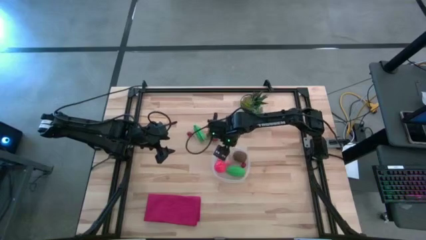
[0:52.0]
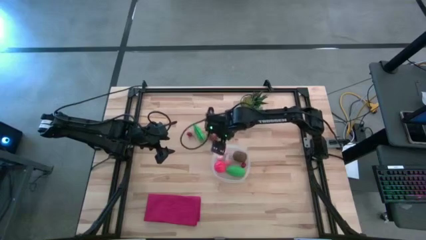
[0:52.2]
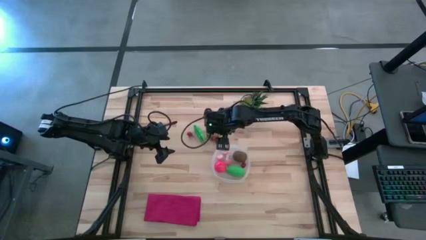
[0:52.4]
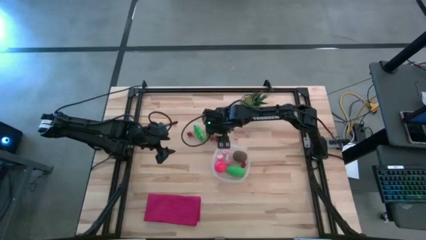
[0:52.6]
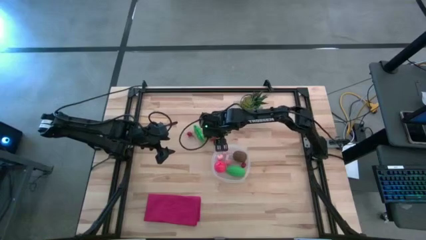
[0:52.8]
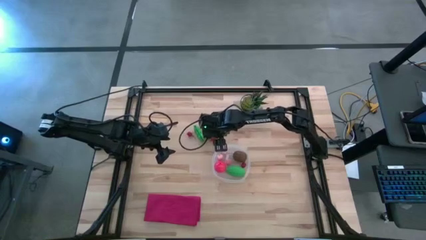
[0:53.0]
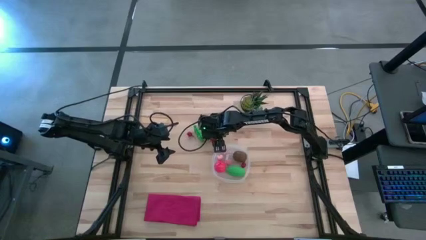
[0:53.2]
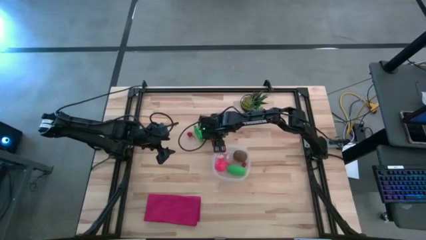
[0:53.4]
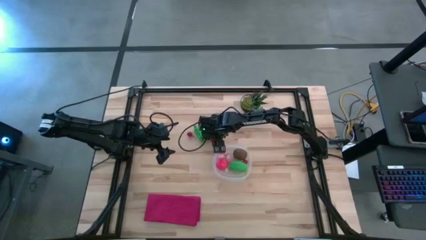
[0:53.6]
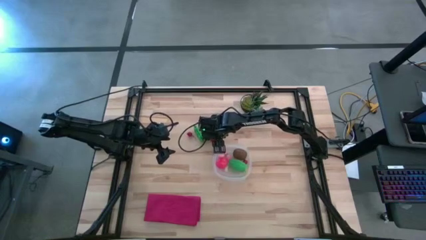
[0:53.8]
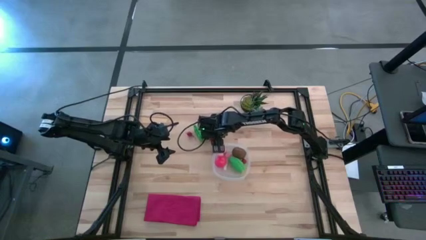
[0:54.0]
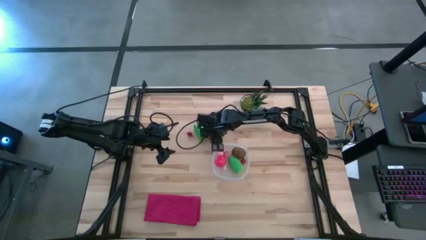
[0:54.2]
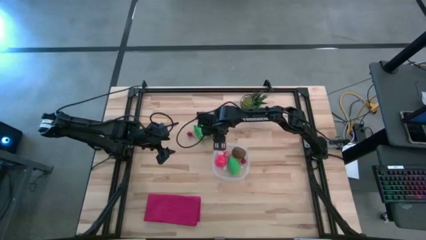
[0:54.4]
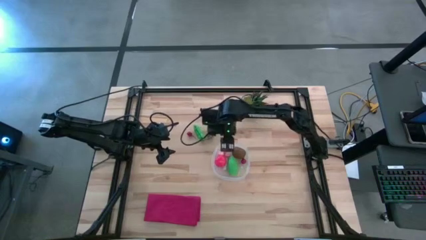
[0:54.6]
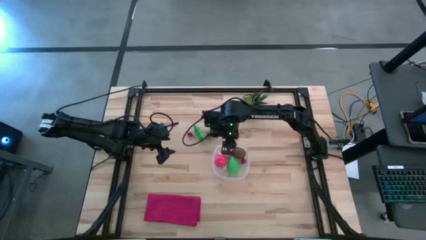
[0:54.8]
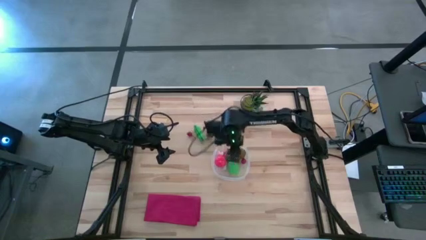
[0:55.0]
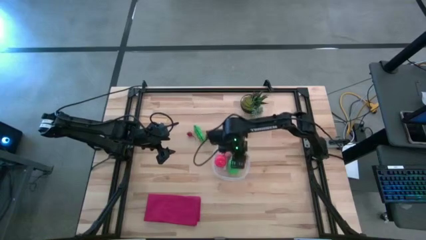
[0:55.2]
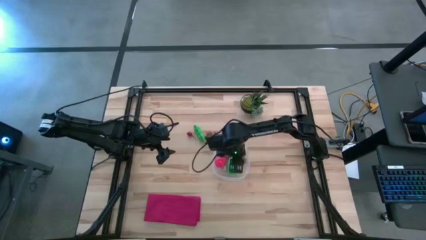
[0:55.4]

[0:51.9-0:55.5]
Task: Pick and placing Produce into tupperware
Put the right strawberry into the transparent container

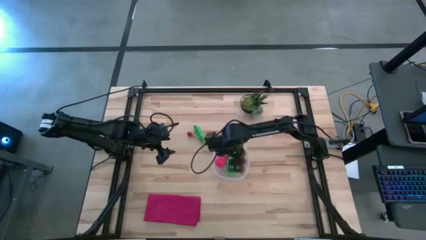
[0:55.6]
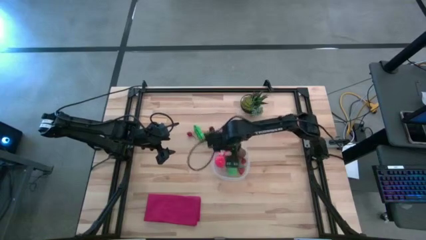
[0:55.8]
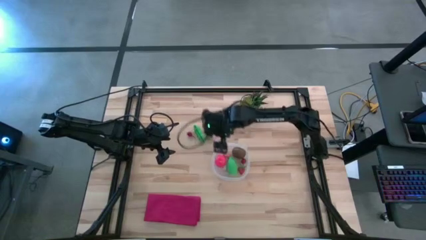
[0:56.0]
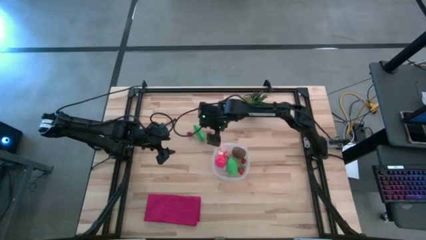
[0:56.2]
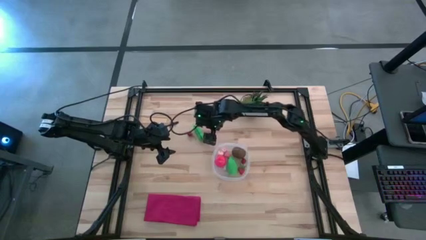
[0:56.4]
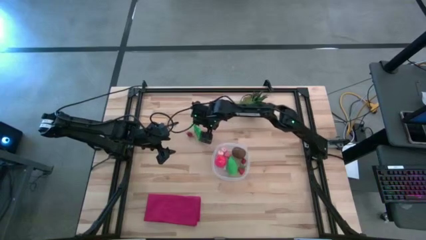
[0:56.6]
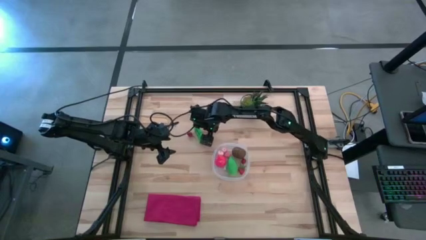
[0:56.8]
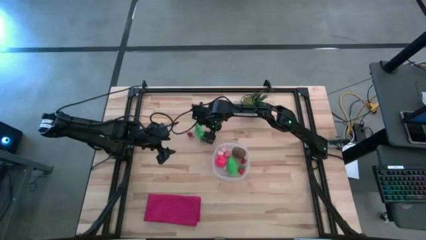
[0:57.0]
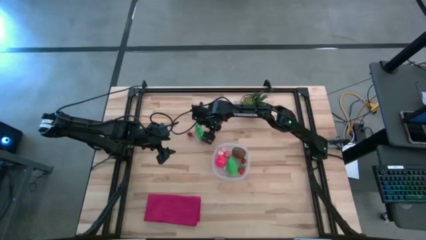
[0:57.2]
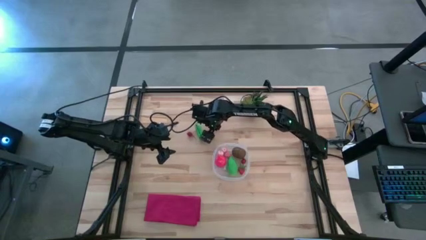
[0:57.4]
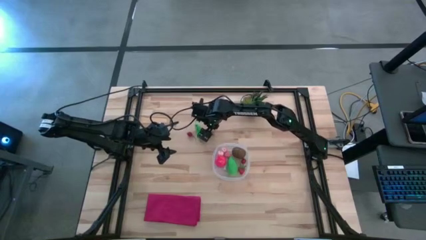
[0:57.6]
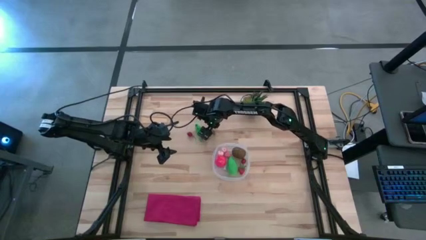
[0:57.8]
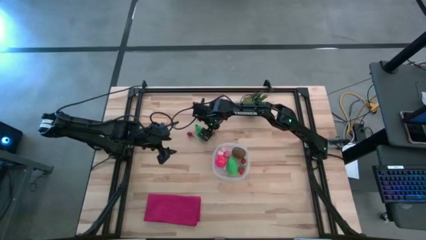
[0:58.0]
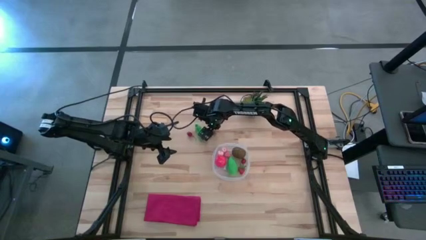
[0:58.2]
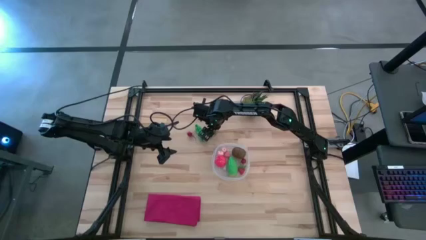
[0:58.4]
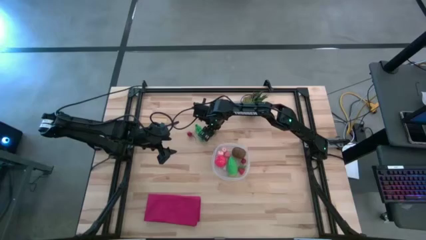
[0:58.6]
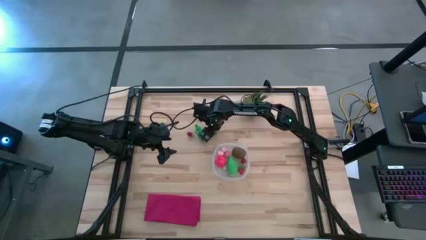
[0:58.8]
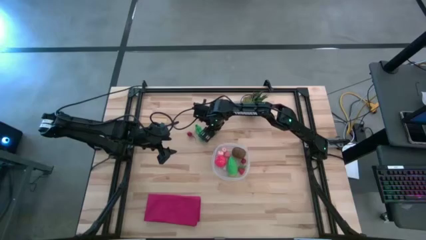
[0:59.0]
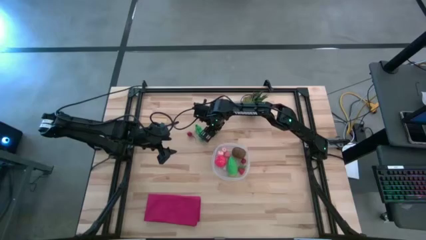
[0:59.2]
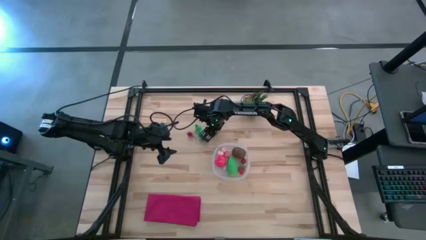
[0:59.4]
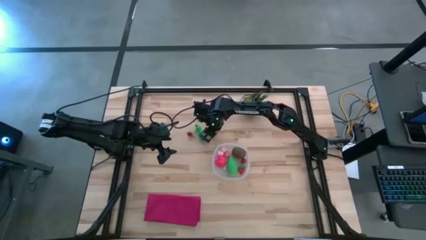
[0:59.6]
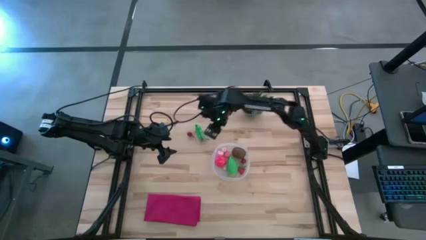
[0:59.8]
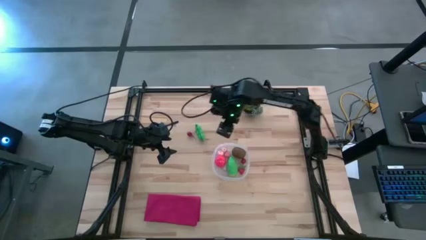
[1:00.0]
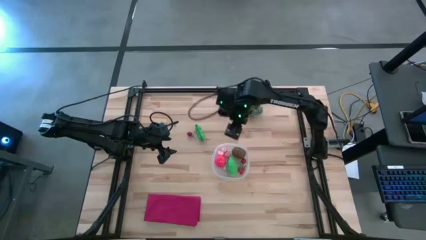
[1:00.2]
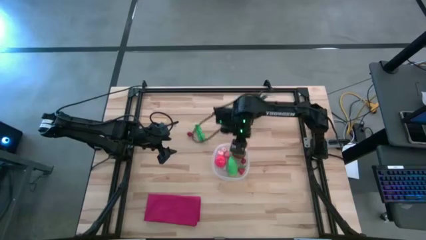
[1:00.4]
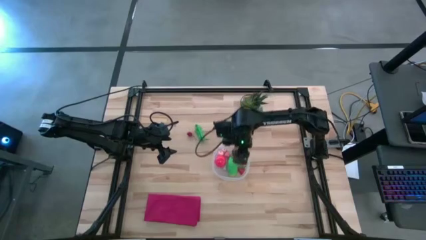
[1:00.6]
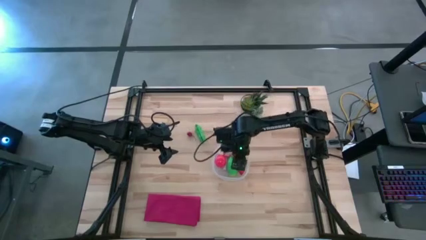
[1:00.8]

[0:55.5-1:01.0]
Put the strawberry into the transparent container

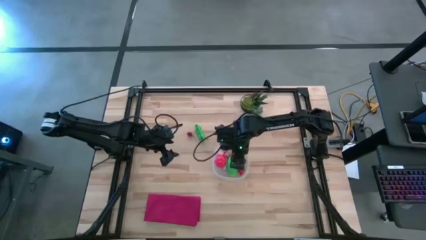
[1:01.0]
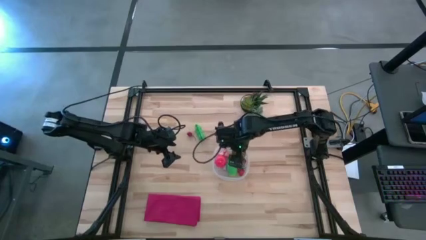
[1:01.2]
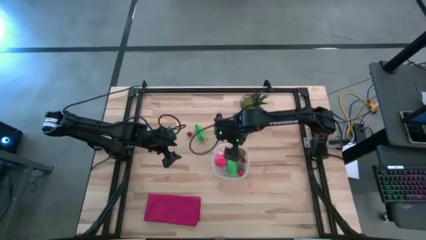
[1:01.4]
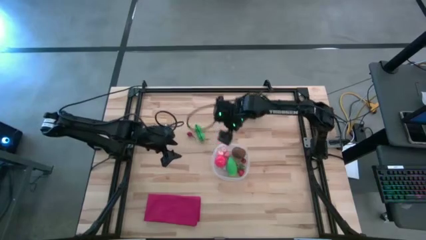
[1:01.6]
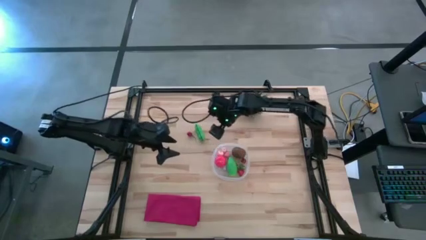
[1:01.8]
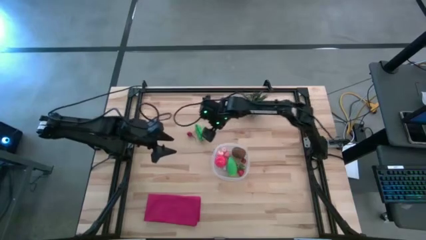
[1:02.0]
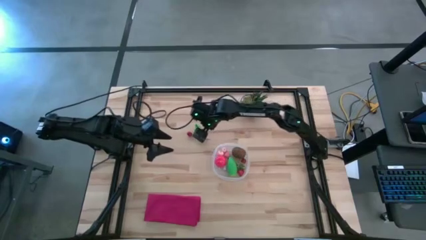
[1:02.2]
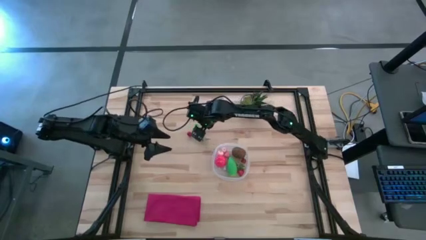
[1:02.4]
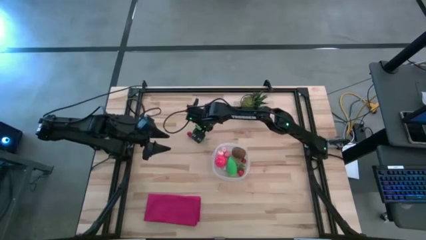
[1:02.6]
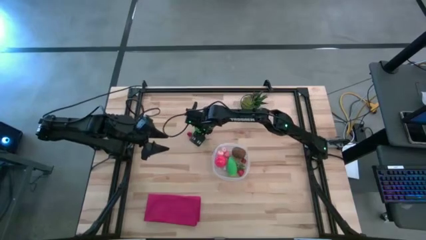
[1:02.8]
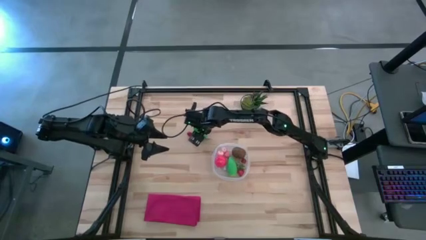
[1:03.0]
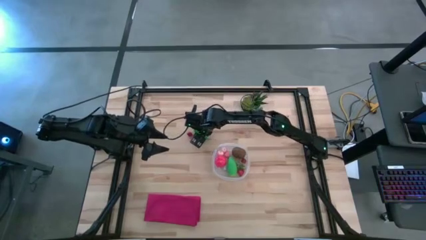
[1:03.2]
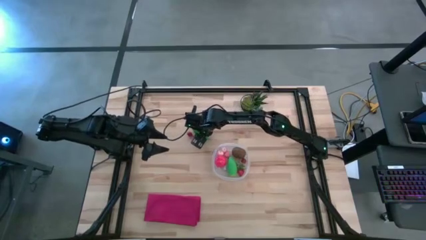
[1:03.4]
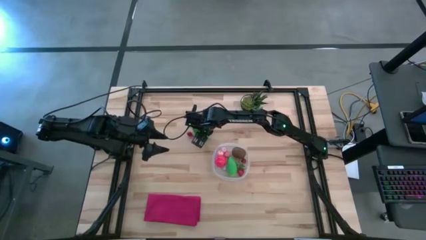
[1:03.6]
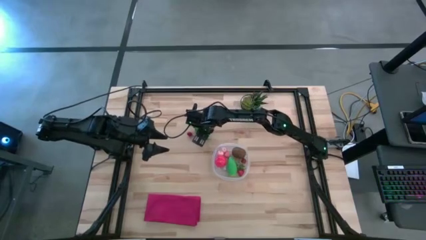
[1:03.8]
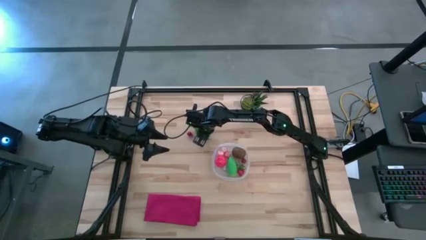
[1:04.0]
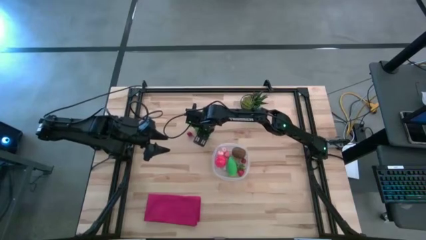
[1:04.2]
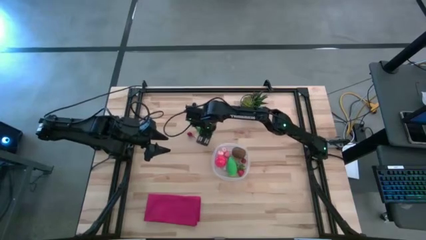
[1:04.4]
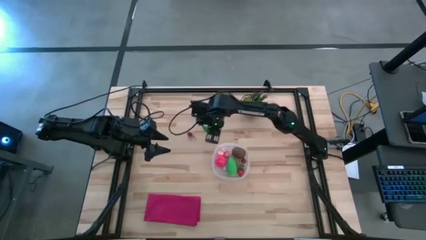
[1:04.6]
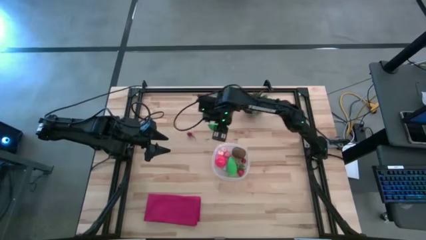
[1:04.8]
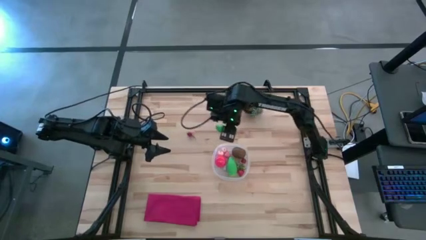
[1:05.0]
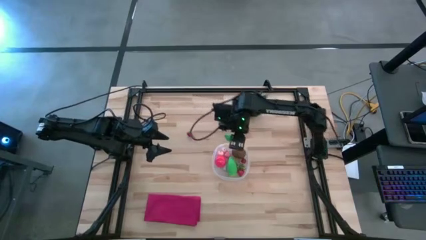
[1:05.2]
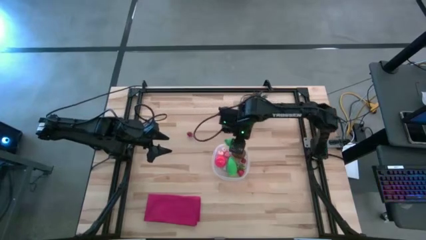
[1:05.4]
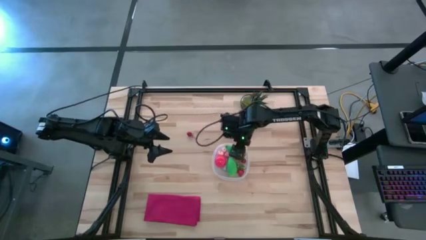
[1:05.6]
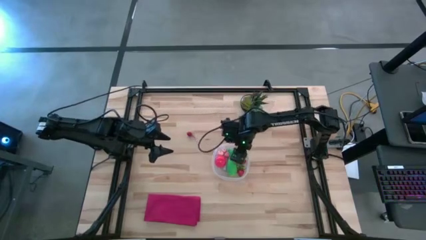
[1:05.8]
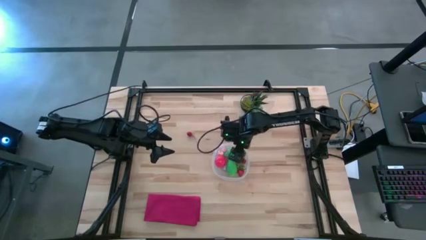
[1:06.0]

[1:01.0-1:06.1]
Put the pea into the transparent container
